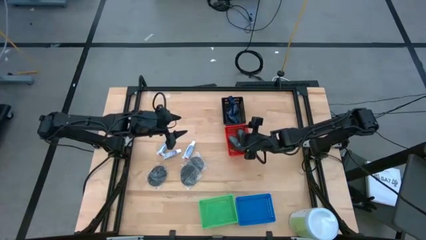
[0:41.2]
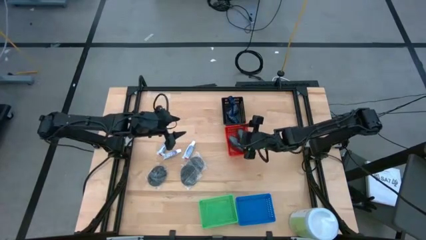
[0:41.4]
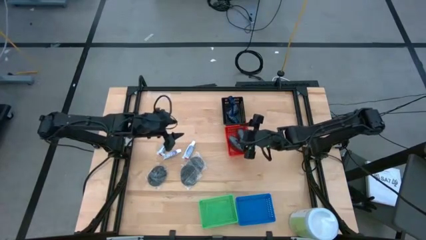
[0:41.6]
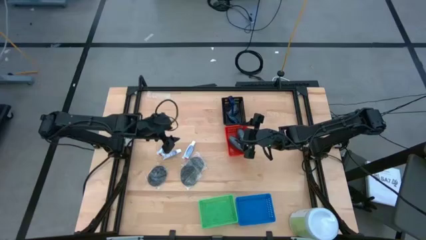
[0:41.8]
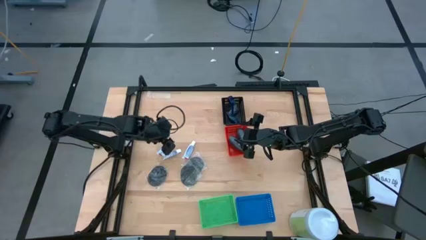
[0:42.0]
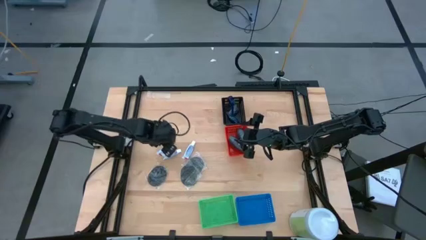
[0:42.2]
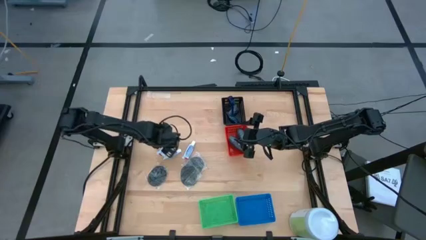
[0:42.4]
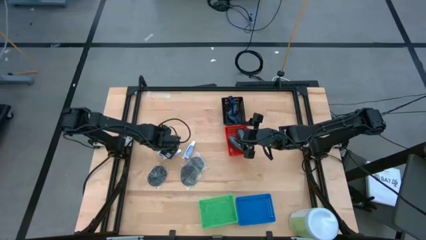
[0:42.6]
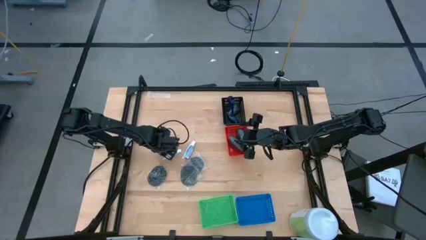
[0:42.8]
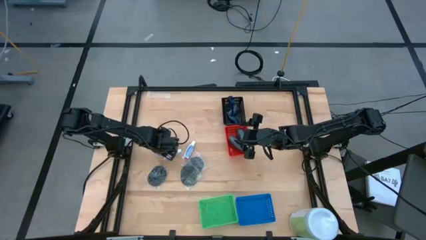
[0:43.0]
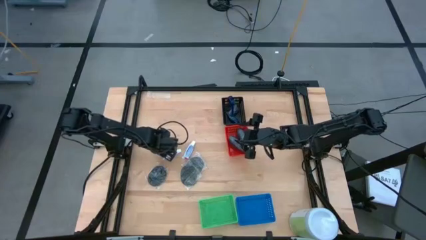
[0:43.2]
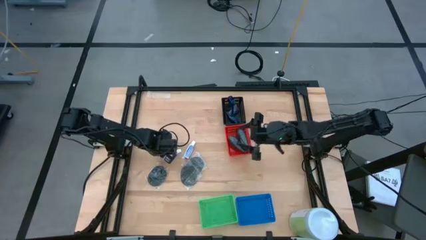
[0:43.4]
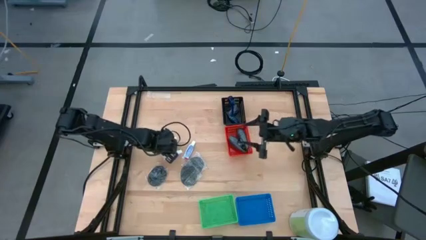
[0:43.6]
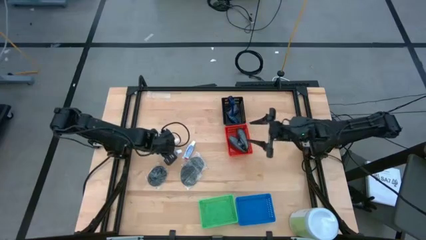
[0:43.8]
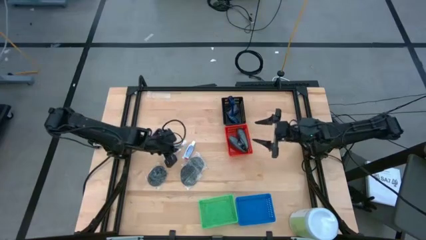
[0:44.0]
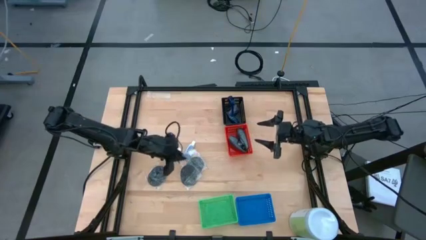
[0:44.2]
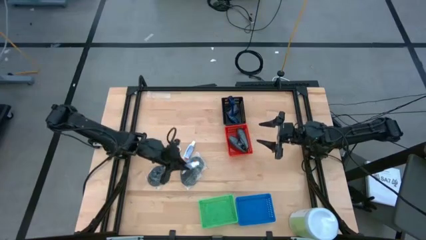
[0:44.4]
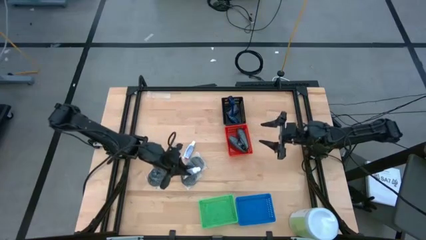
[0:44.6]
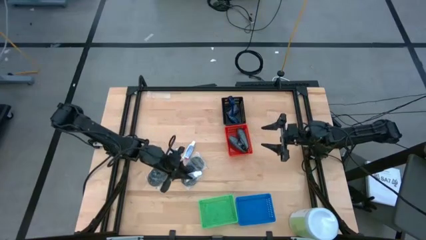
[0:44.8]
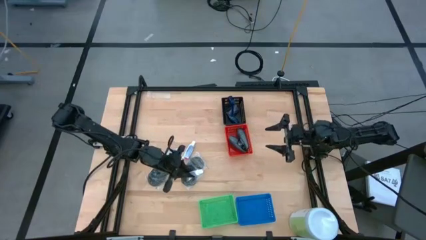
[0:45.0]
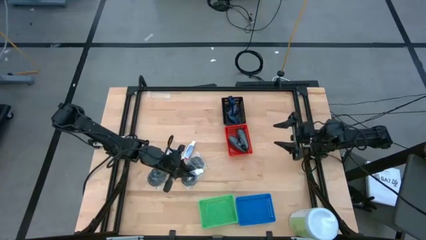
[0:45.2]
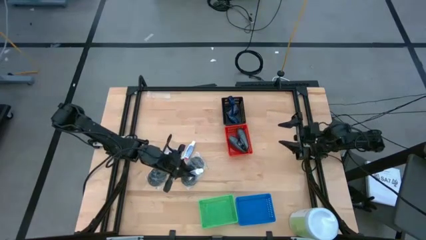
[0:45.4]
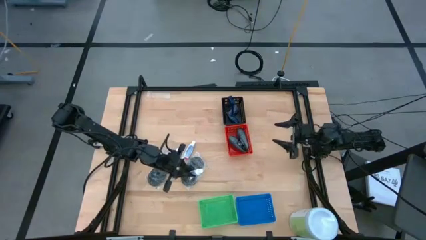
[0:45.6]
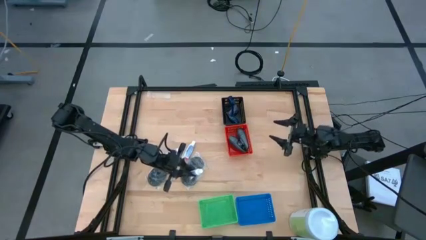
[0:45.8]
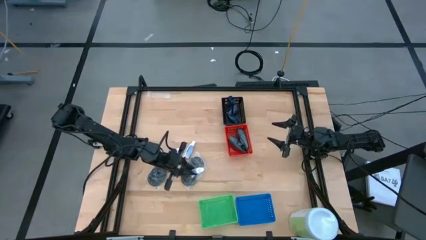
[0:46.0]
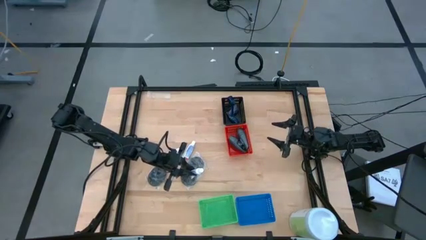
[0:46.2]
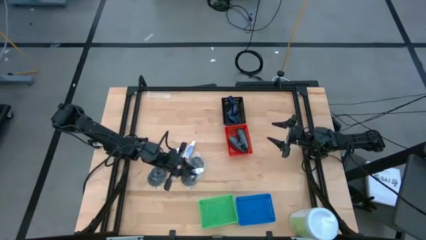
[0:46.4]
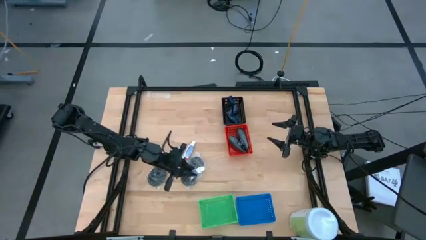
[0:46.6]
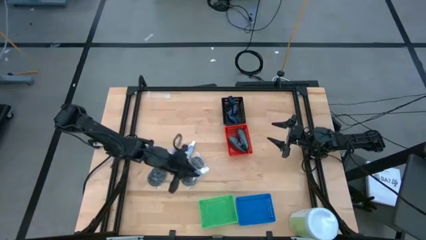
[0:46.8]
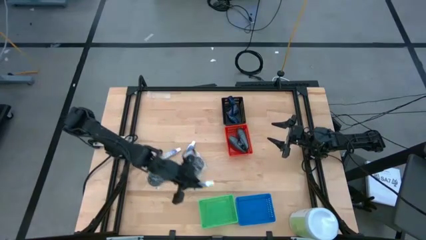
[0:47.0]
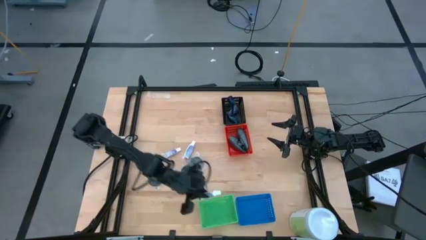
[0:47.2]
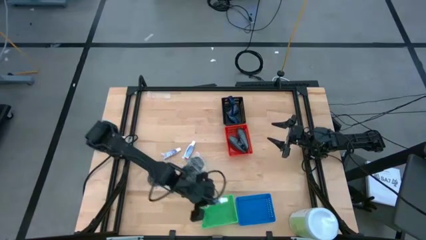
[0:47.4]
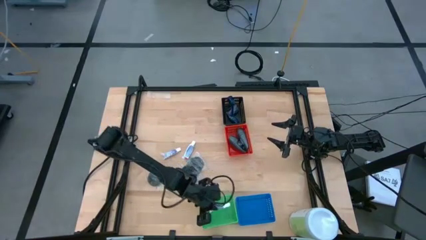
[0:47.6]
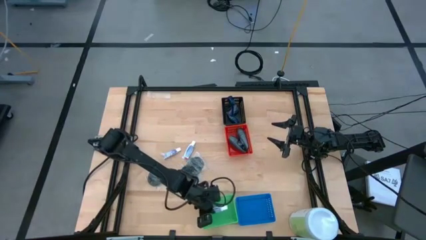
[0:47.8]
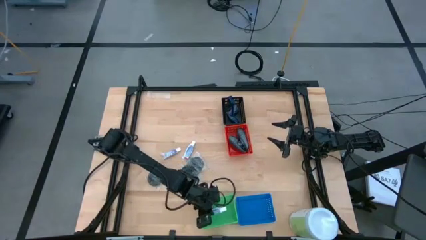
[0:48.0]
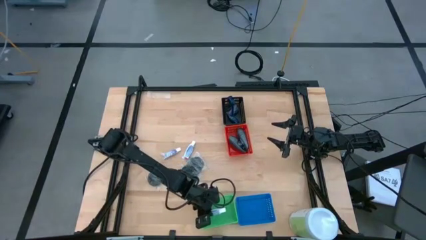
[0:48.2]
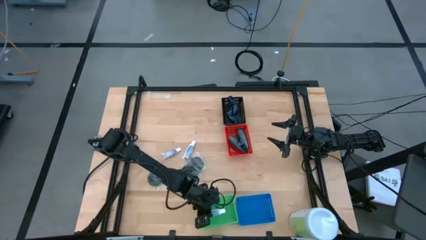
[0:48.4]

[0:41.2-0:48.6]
Task: Pick & Place Travel size toiletries
Put the left white toothpaste into the green bin

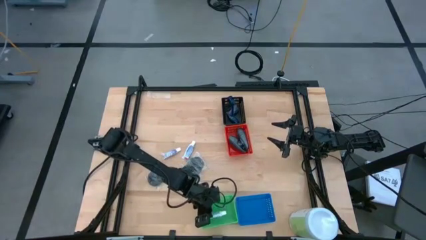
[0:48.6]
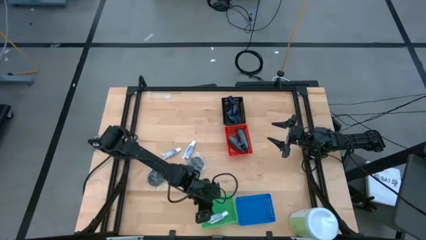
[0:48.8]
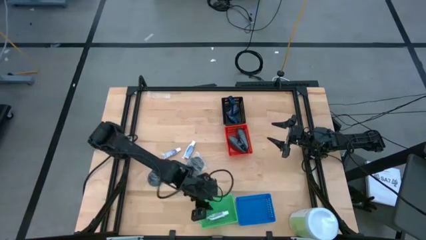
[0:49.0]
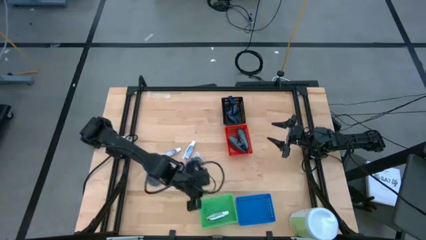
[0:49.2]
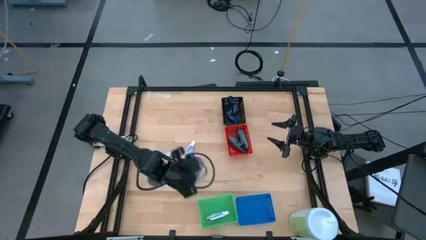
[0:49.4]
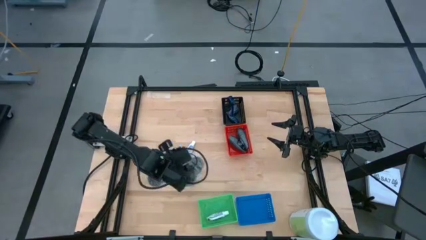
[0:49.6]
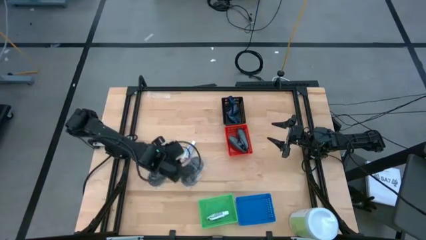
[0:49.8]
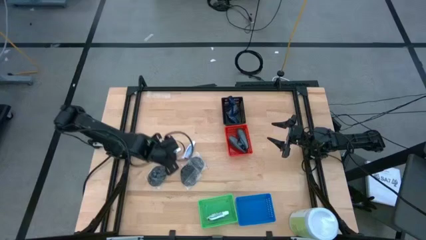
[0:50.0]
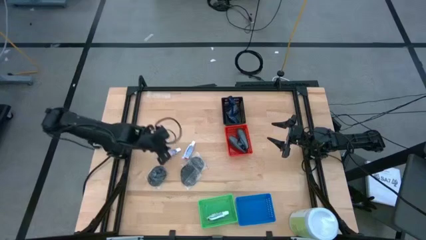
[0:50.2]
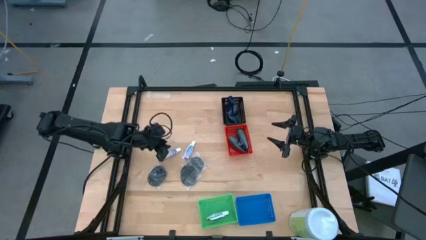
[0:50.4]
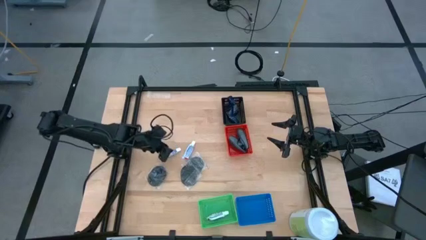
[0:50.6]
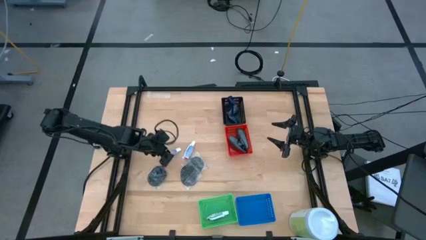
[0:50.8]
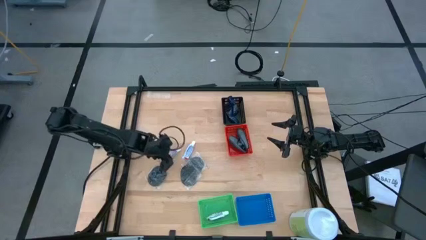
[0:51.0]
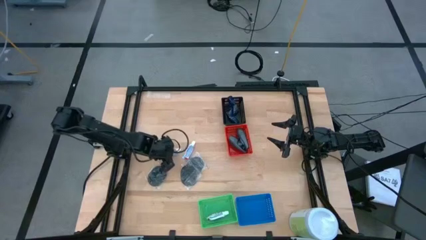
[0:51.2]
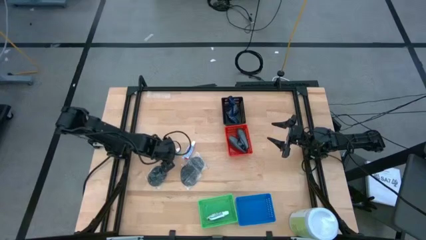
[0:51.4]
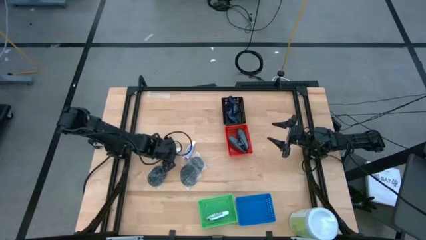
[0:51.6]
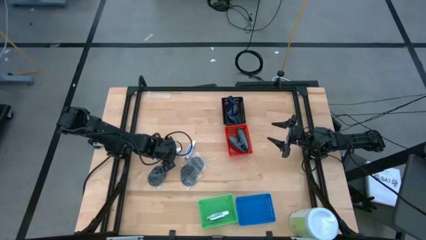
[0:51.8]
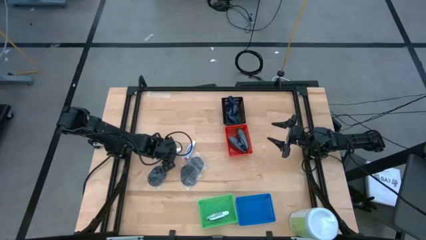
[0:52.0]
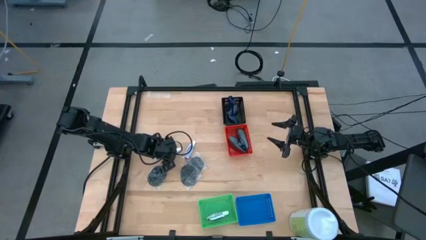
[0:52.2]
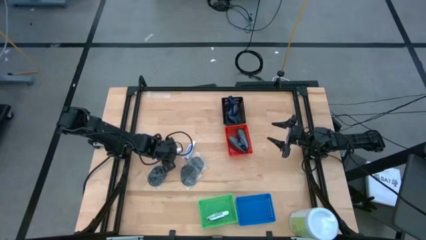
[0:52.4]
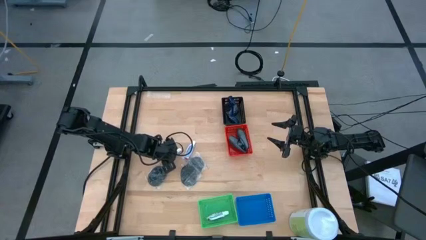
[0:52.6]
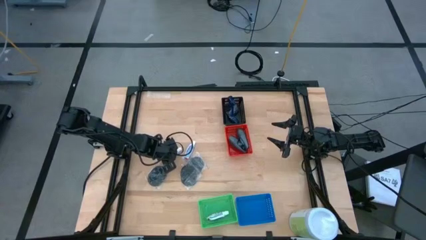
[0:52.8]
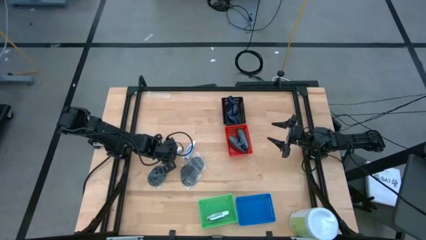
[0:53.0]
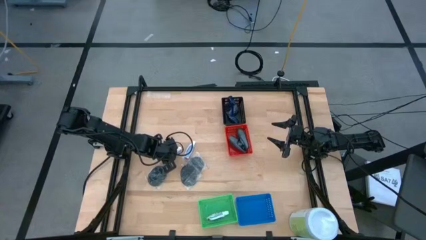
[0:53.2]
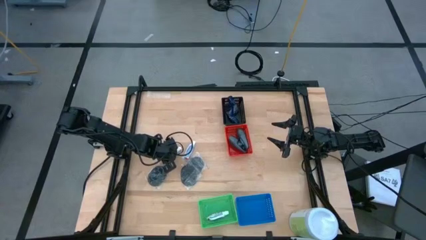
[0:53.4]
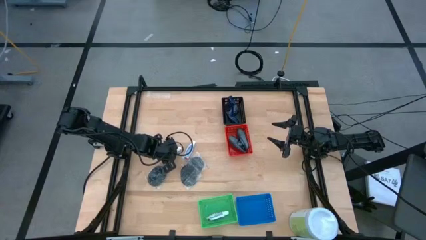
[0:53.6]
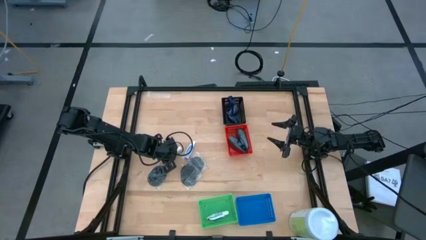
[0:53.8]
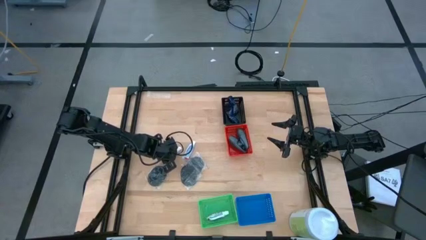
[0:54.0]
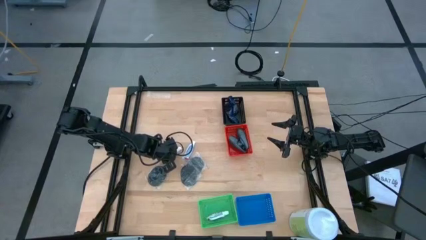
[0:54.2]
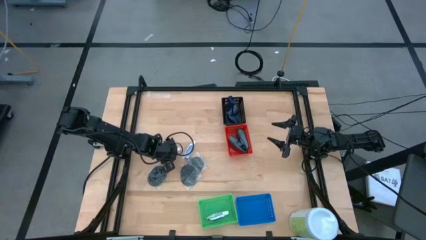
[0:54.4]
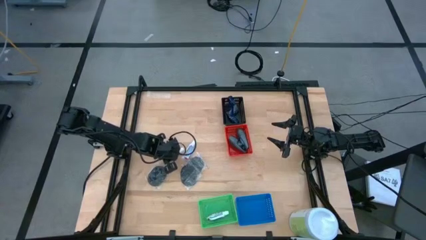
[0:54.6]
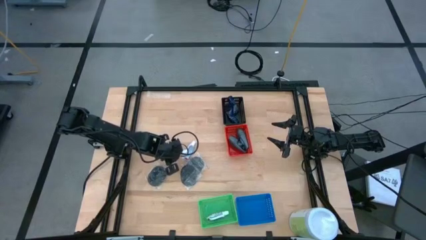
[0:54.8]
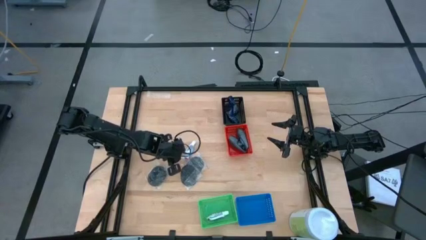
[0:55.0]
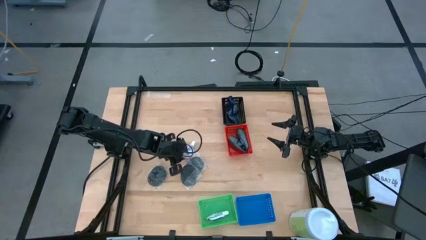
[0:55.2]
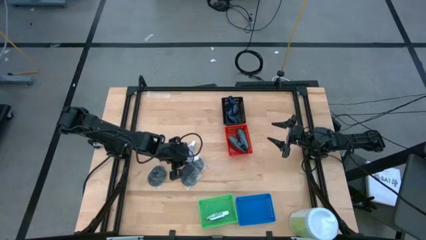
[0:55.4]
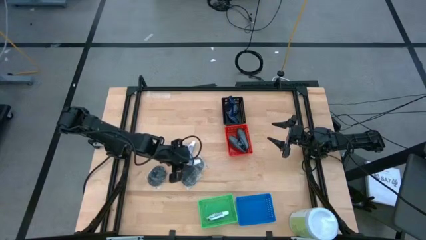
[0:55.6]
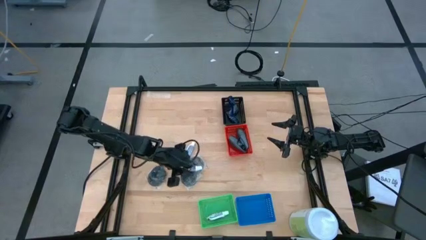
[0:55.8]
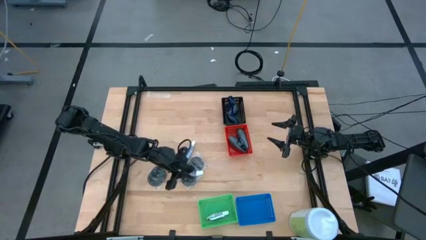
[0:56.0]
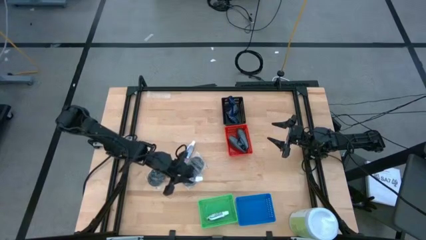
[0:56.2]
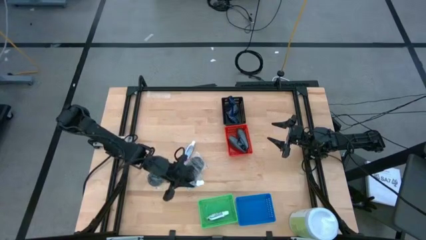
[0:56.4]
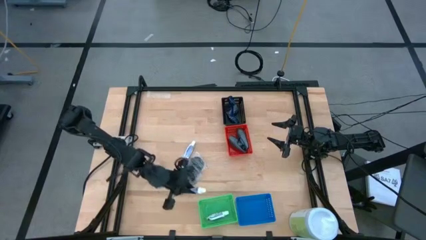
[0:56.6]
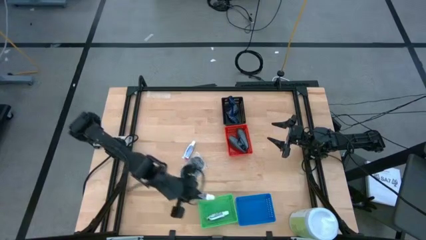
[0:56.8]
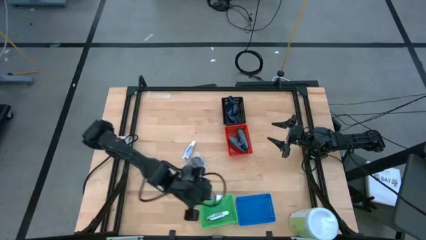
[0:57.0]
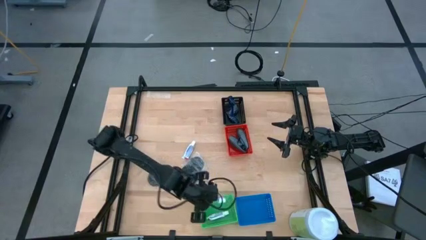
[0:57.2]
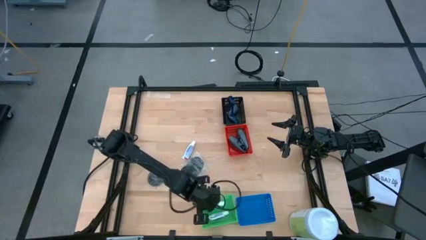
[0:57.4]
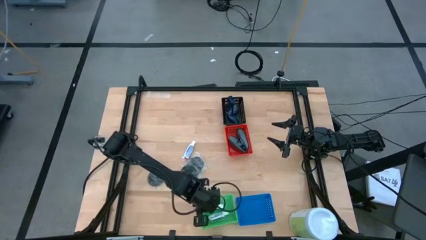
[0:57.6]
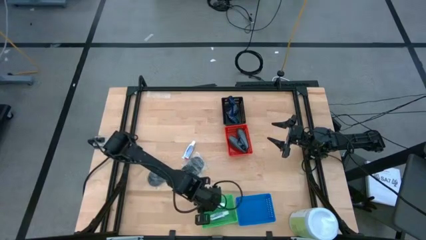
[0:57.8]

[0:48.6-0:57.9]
Put the left white toothpaste into the green bin
